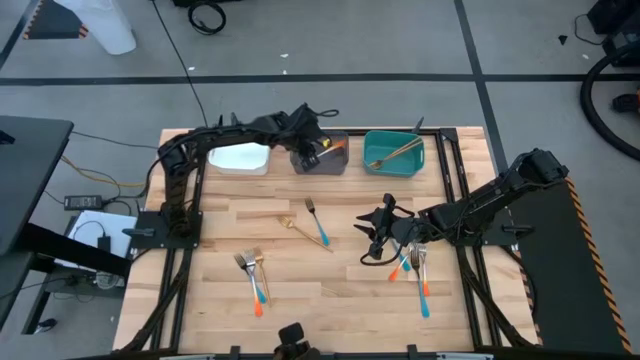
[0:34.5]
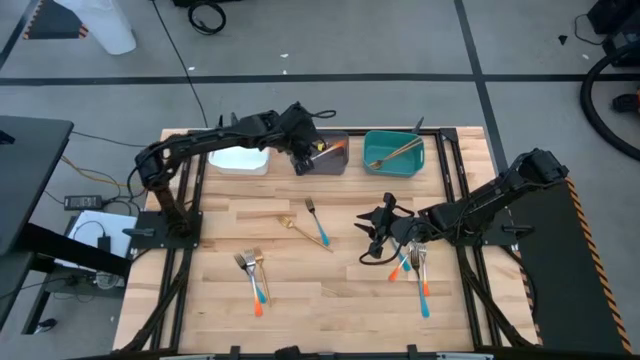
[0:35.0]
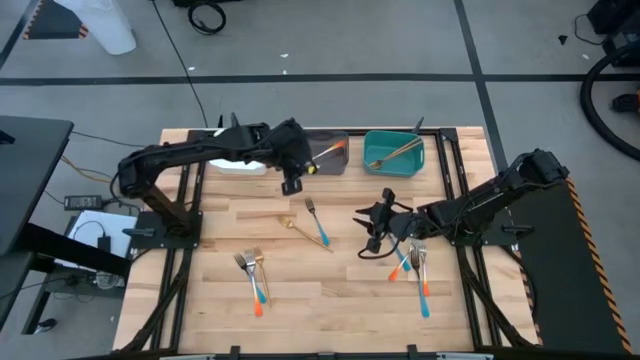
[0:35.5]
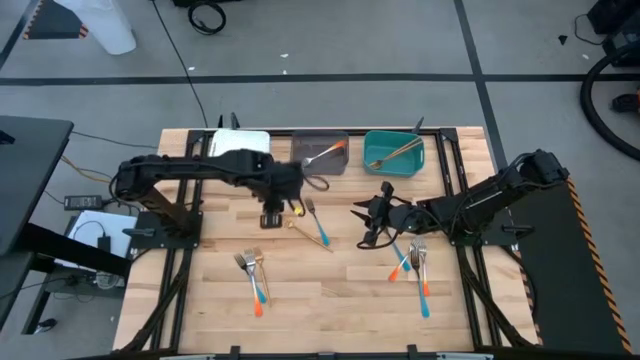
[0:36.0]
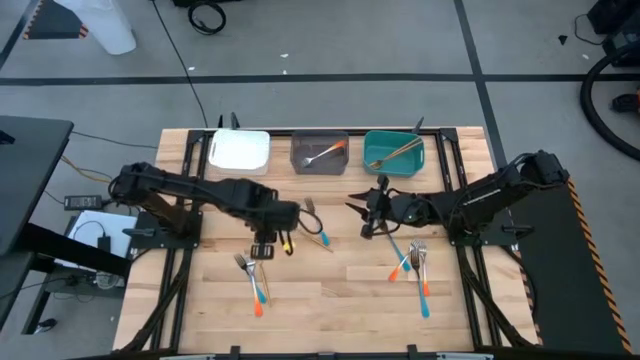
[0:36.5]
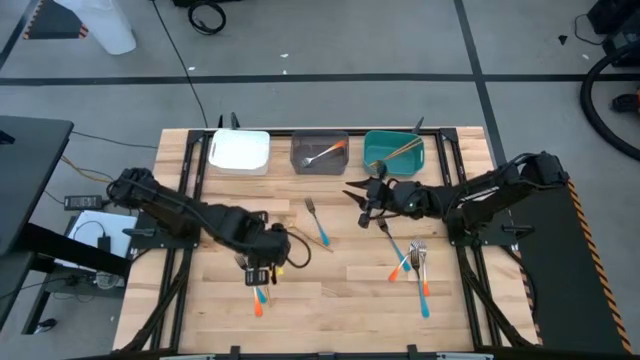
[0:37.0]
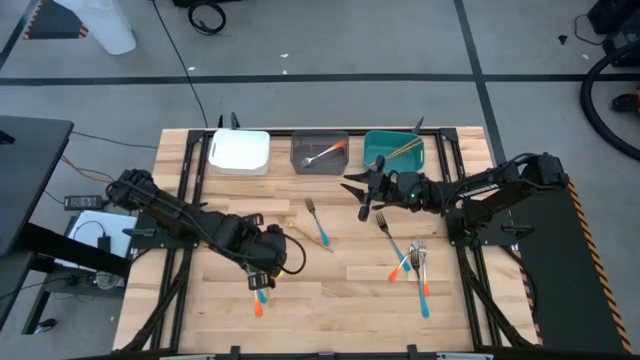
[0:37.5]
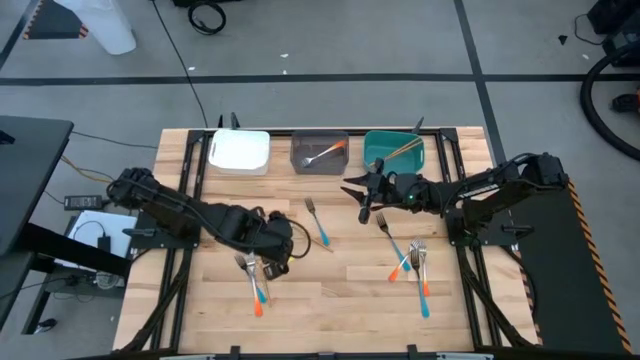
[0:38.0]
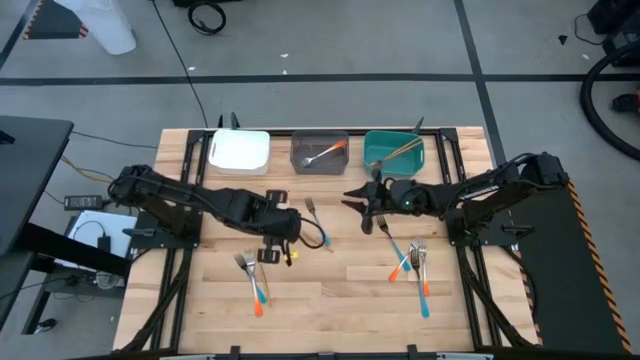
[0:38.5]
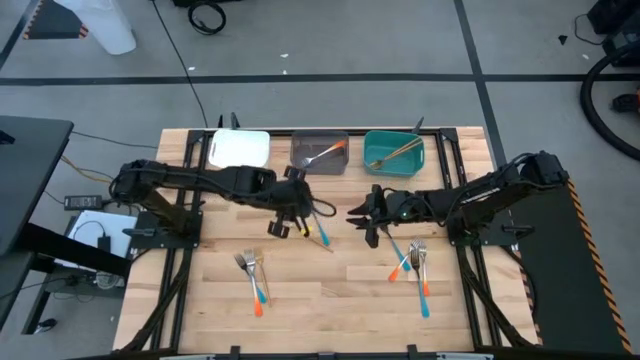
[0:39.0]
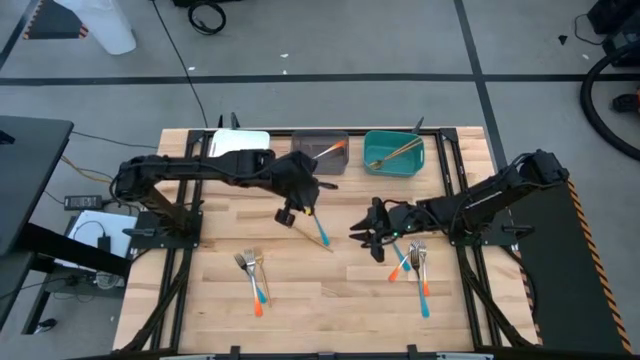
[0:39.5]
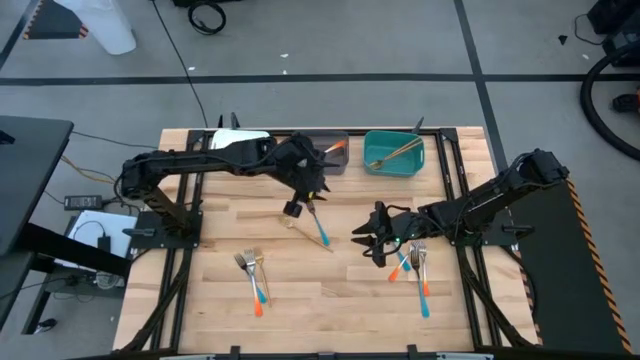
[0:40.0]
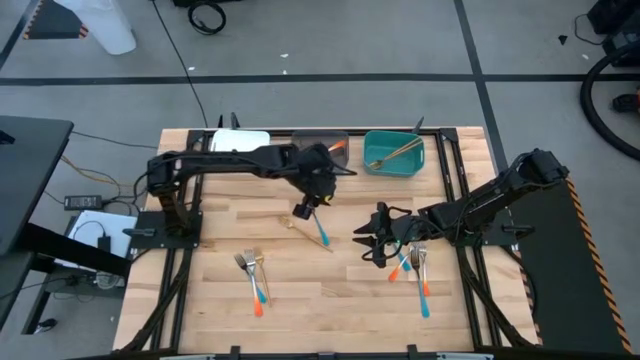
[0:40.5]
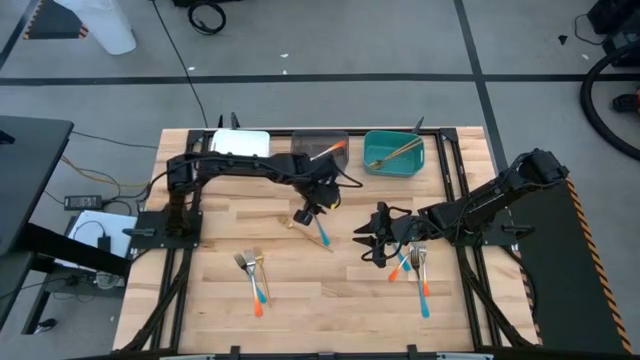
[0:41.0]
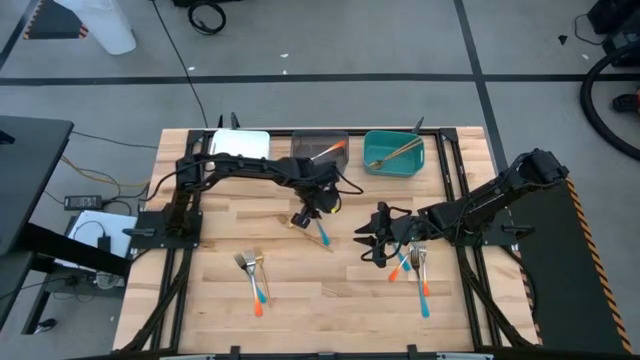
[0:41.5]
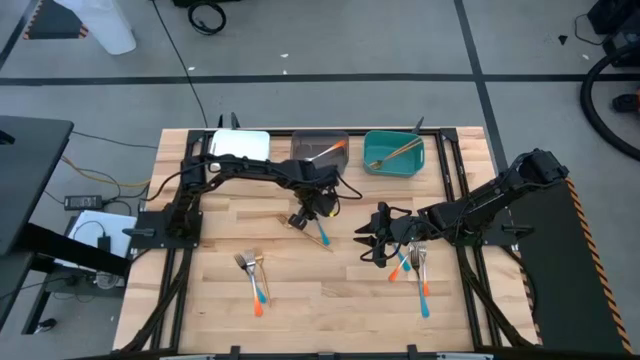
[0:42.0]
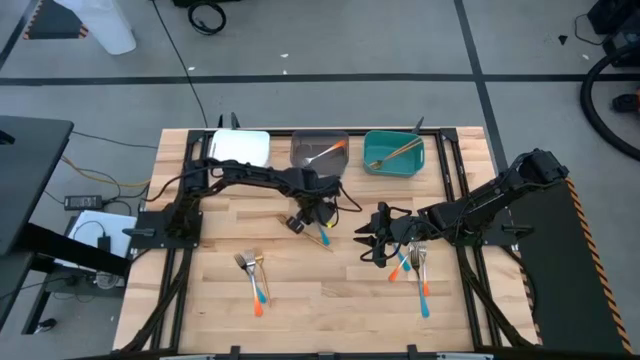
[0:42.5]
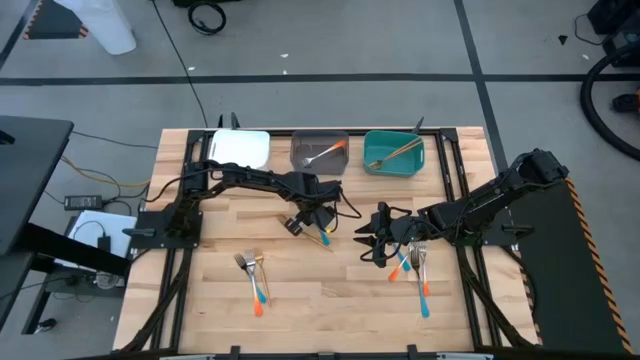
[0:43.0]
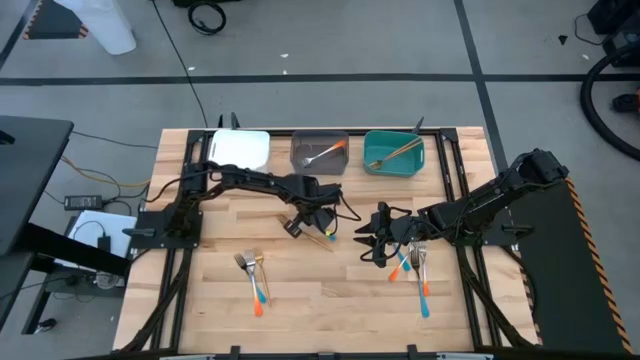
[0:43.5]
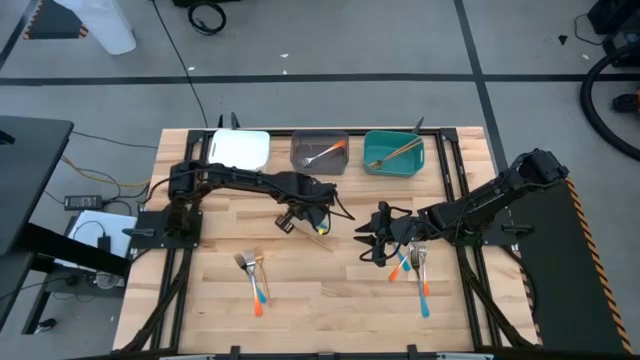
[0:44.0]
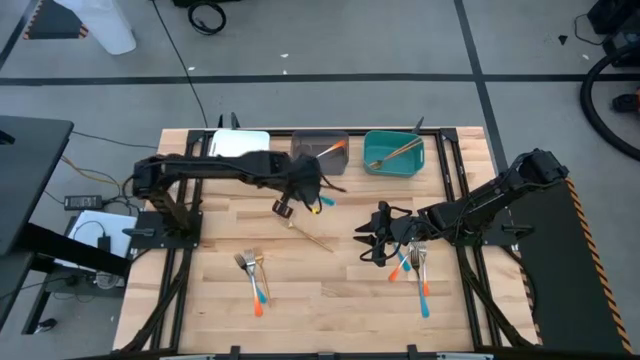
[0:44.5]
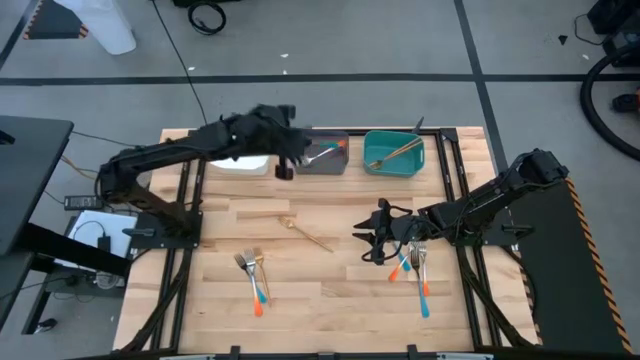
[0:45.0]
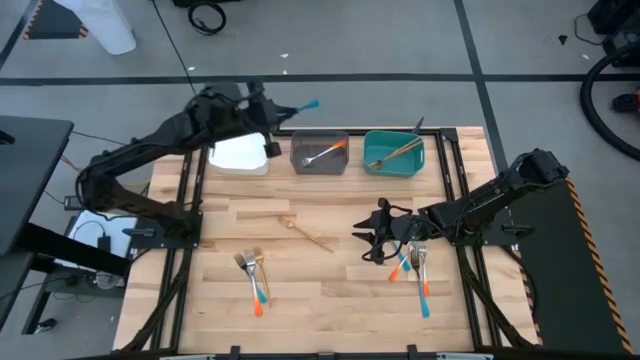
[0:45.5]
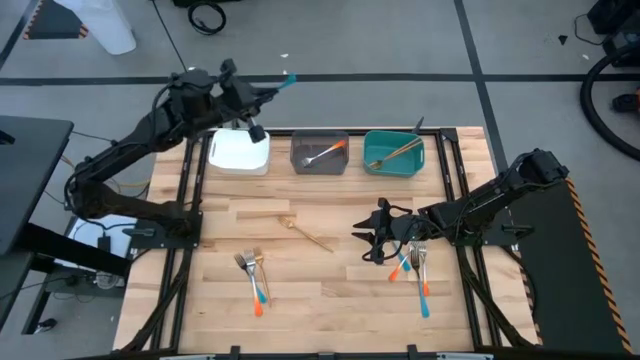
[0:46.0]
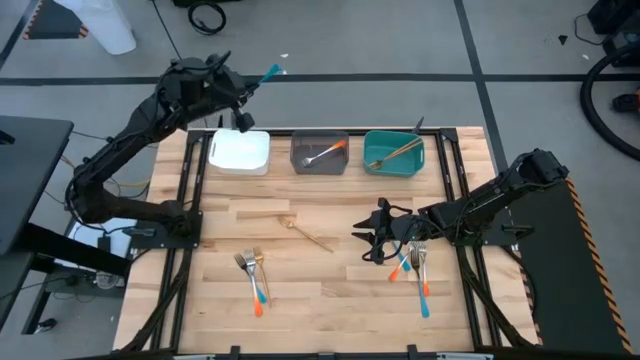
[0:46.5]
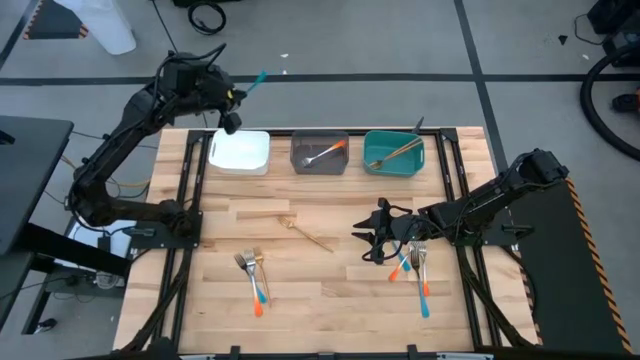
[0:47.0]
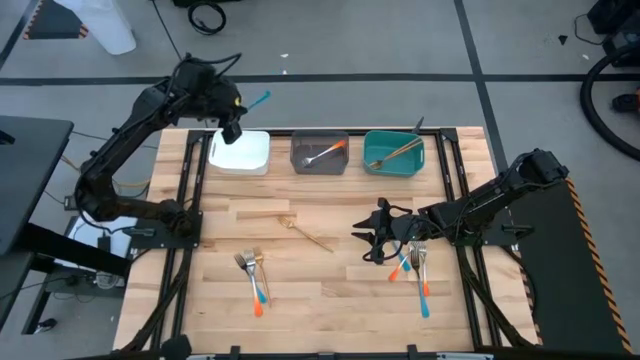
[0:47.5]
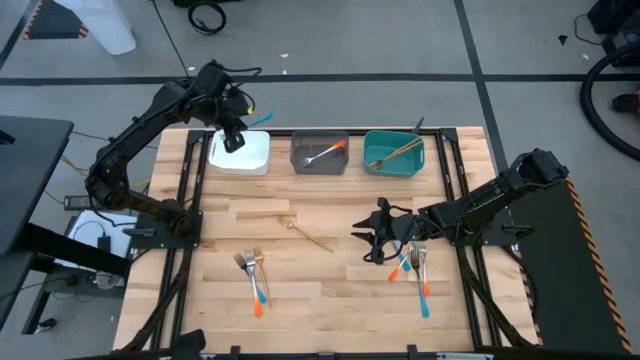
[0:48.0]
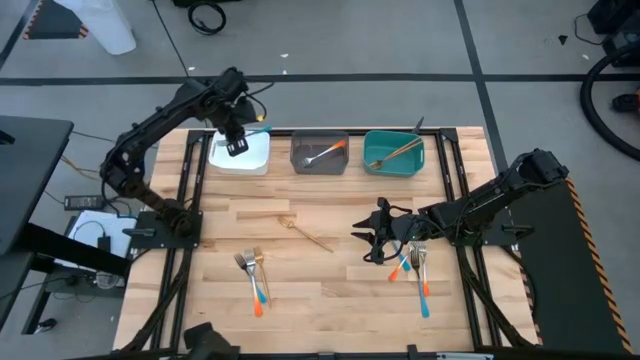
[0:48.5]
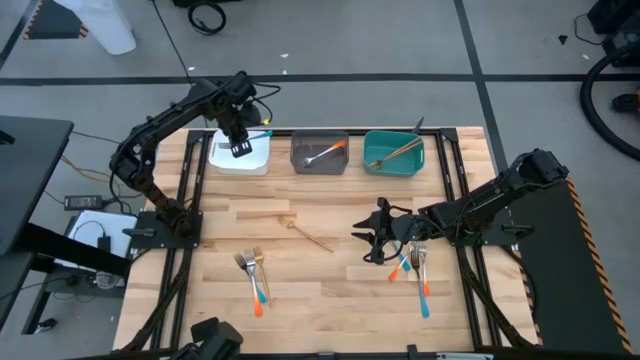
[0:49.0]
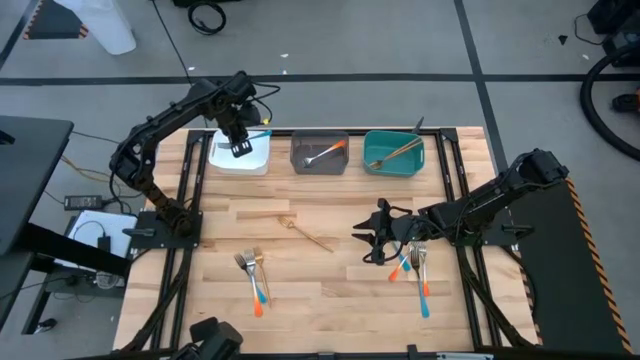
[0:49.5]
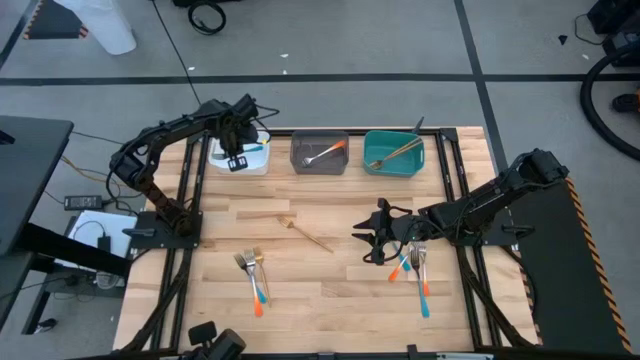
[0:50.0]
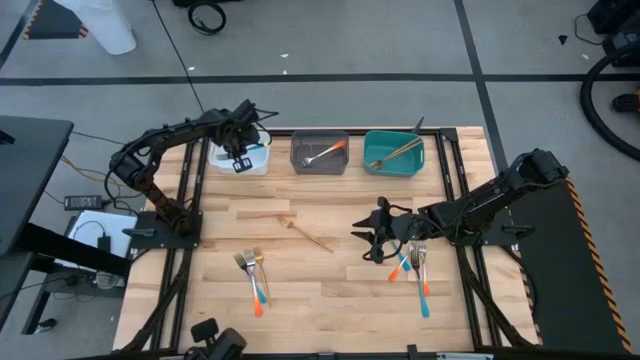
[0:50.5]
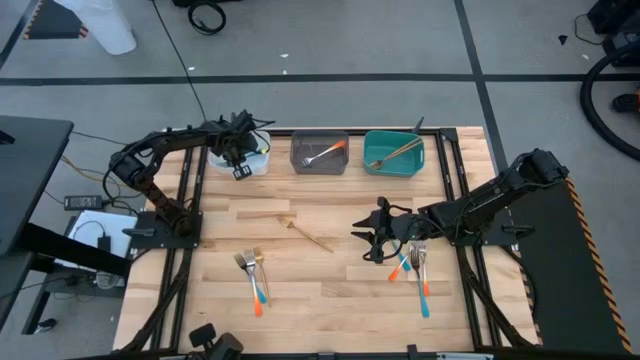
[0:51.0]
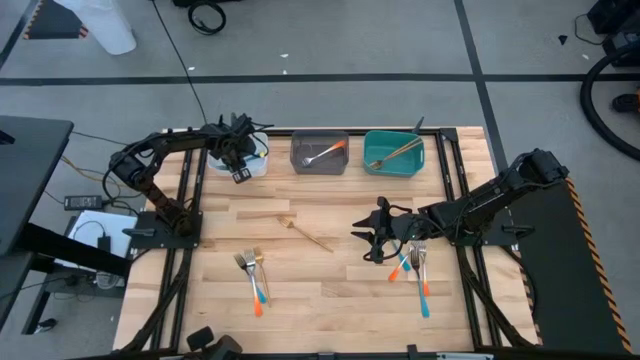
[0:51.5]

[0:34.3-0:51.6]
Task: Sort silverware by color (type)
Put the blue fork into the white bin

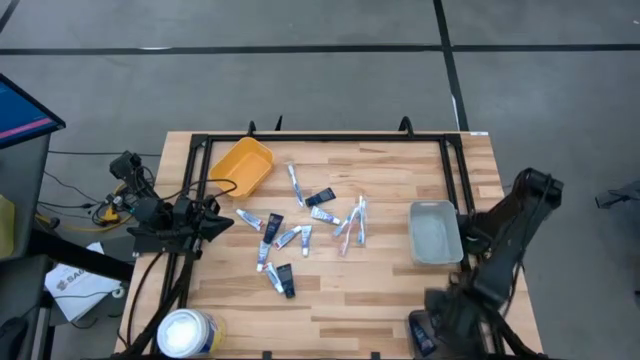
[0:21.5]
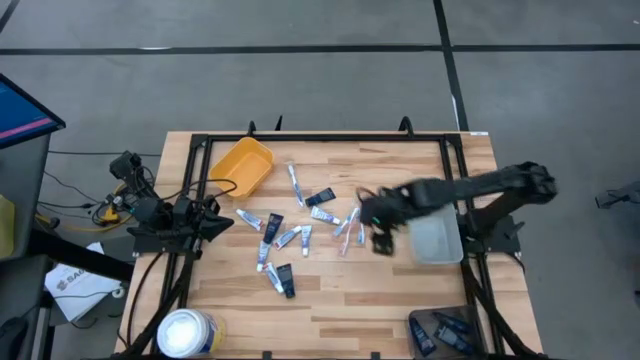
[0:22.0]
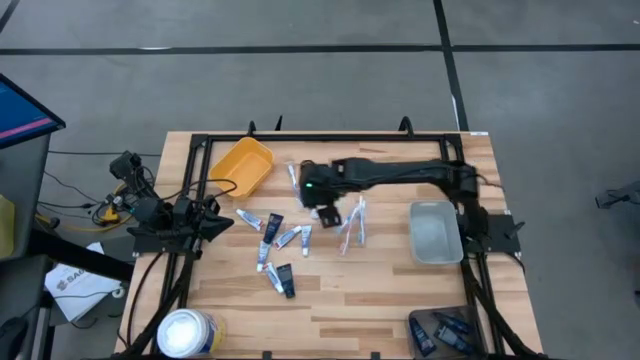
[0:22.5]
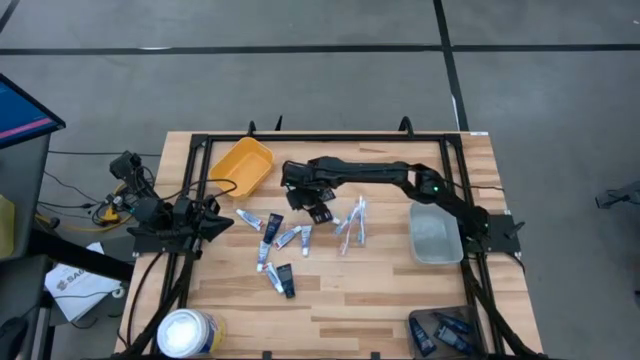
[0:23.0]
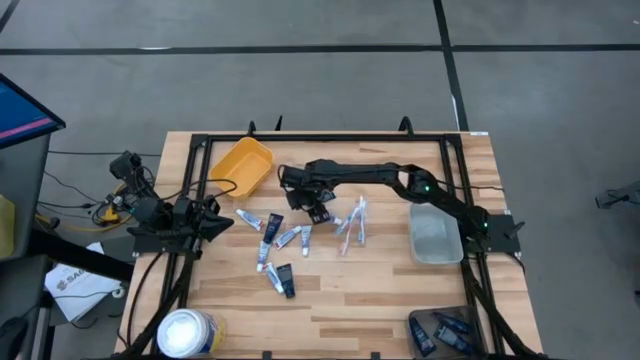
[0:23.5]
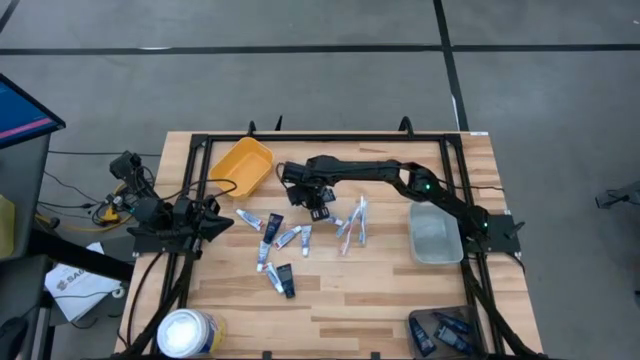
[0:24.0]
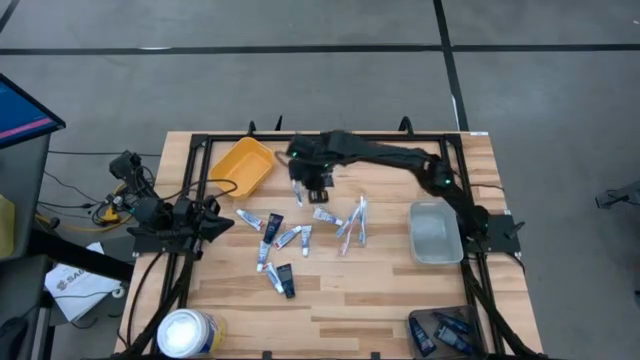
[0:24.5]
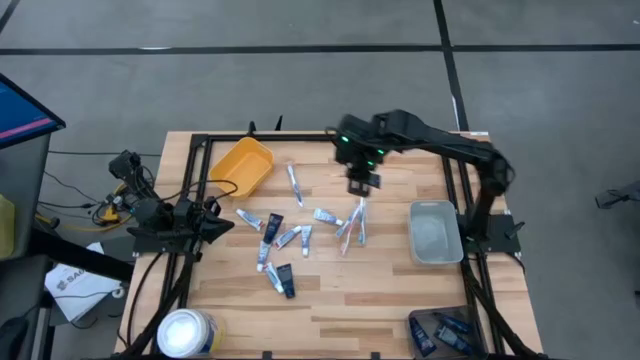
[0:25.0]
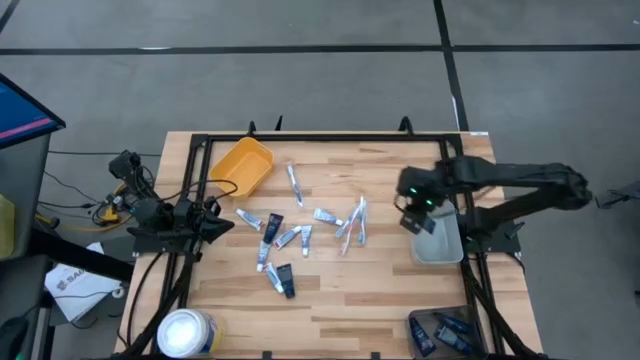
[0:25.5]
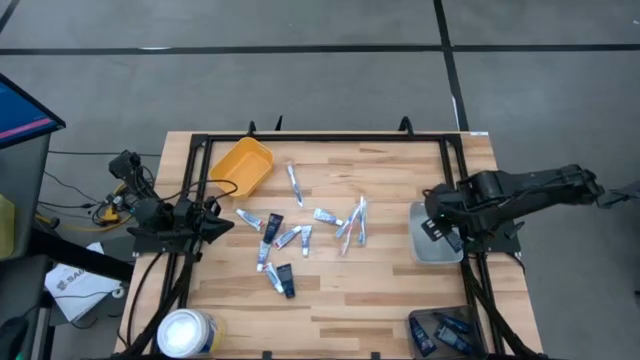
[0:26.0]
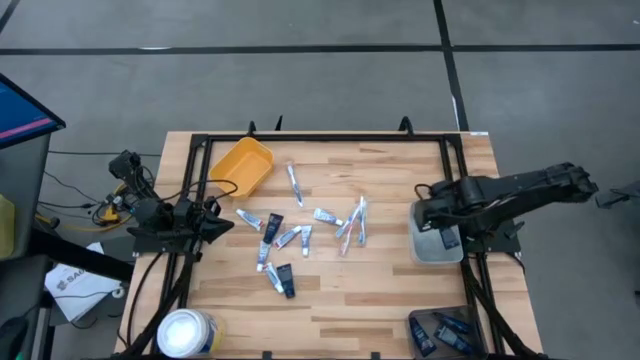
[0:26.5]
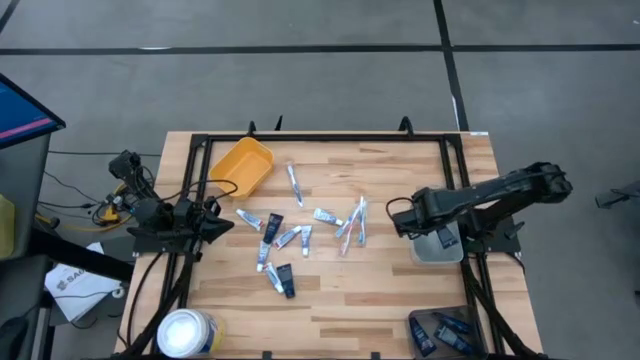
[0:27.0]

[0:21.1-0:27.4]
Task: Pick & Place Travel size toiletries
Put the blue shave cream into the black bin
